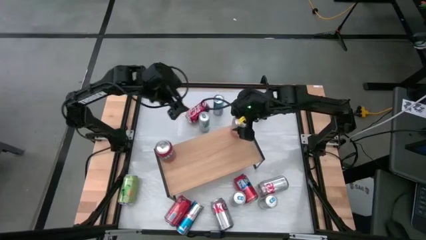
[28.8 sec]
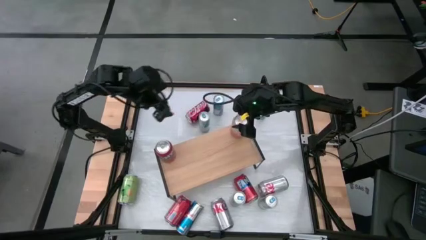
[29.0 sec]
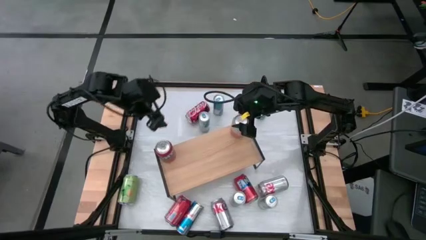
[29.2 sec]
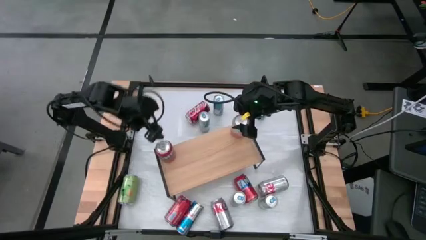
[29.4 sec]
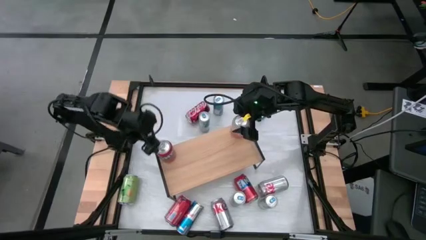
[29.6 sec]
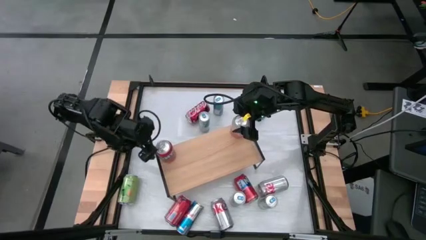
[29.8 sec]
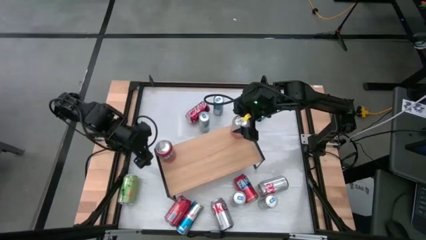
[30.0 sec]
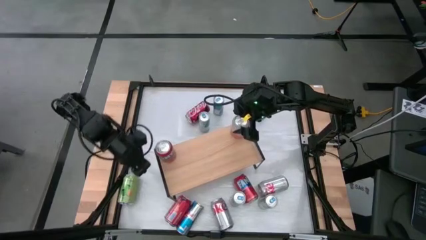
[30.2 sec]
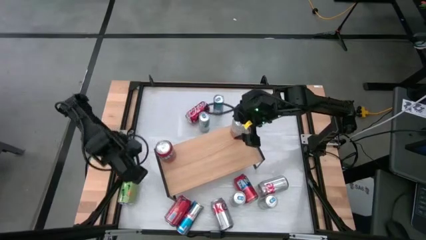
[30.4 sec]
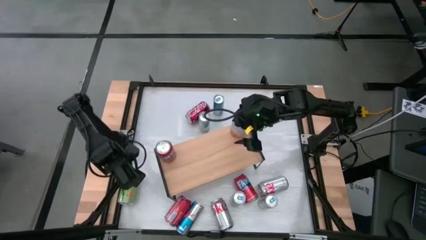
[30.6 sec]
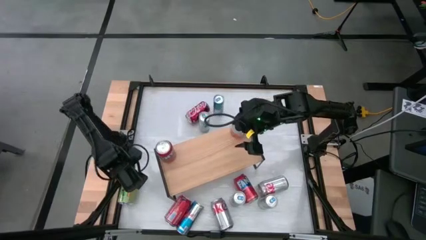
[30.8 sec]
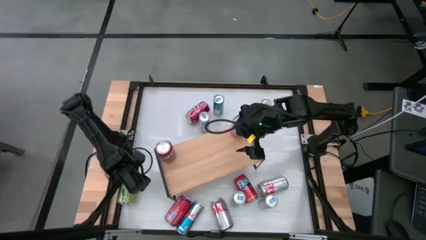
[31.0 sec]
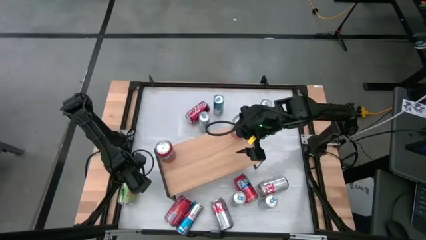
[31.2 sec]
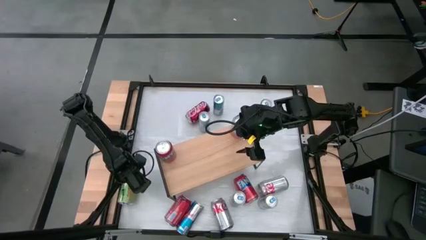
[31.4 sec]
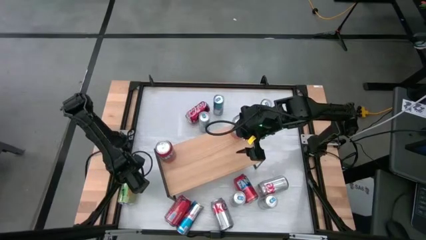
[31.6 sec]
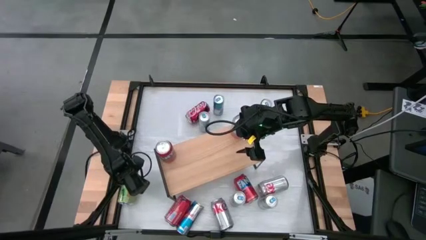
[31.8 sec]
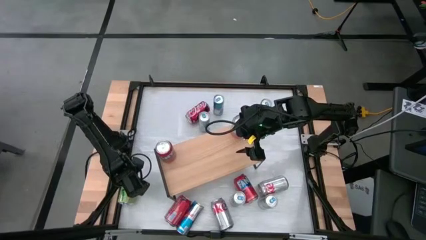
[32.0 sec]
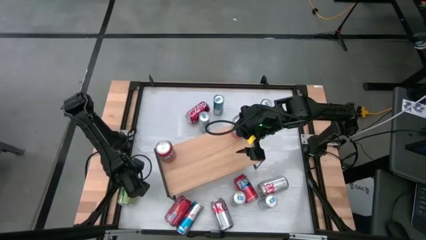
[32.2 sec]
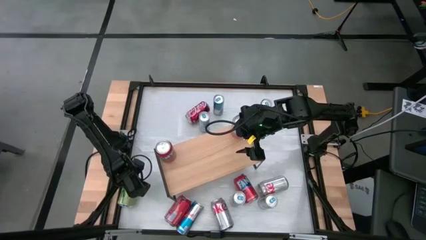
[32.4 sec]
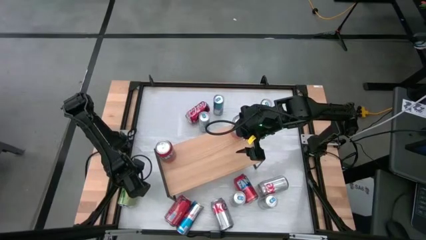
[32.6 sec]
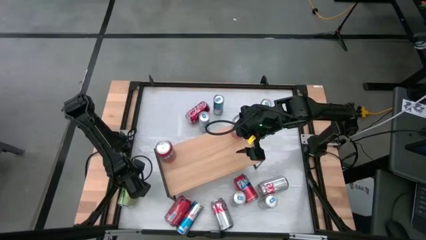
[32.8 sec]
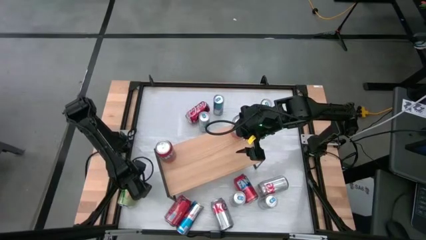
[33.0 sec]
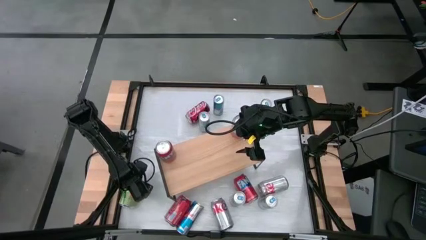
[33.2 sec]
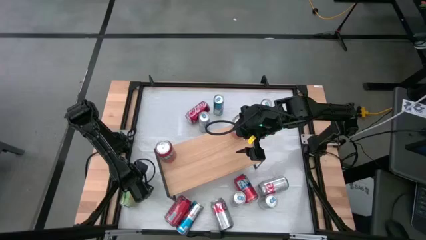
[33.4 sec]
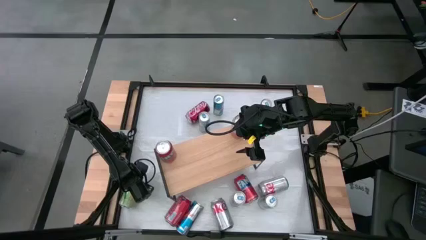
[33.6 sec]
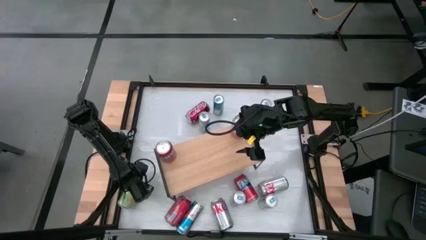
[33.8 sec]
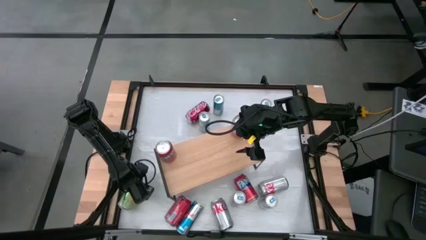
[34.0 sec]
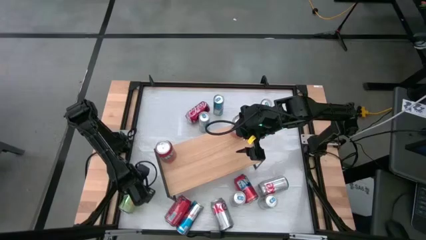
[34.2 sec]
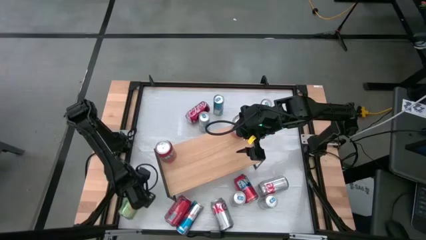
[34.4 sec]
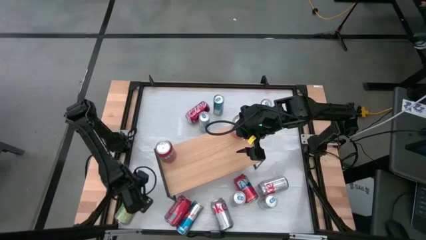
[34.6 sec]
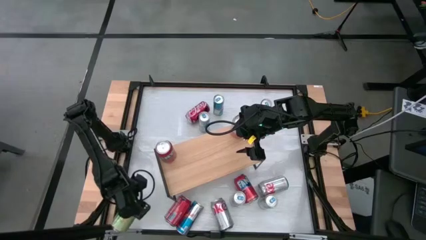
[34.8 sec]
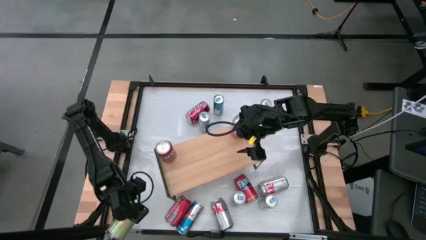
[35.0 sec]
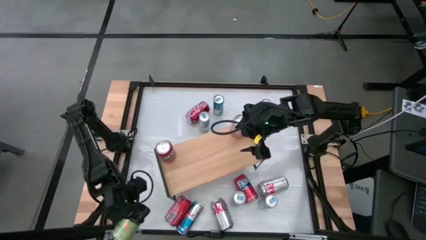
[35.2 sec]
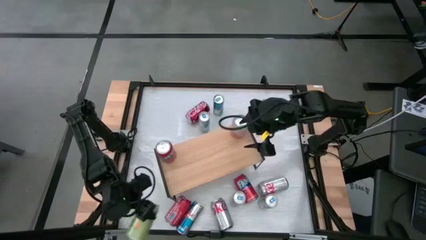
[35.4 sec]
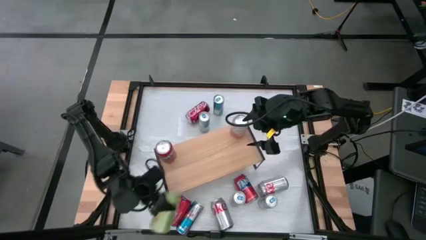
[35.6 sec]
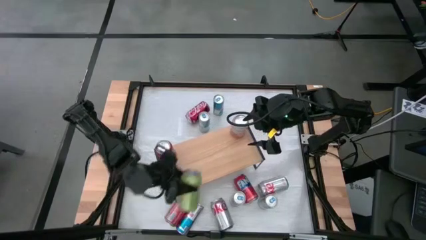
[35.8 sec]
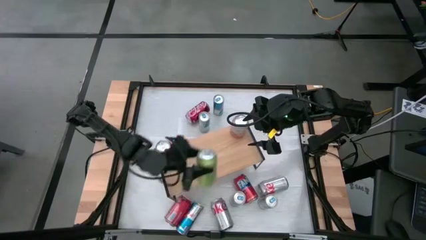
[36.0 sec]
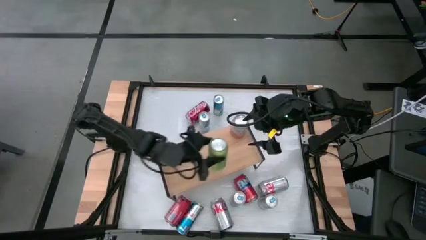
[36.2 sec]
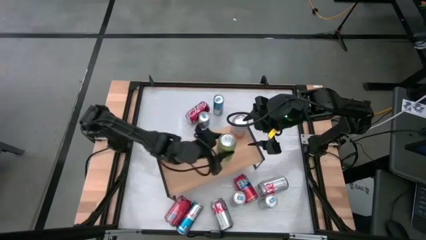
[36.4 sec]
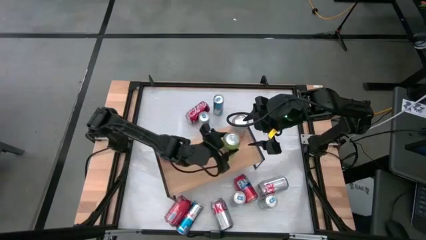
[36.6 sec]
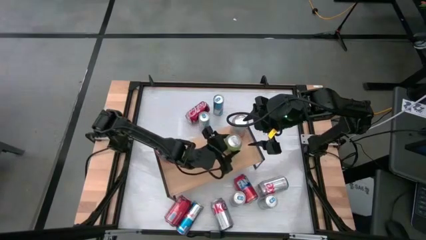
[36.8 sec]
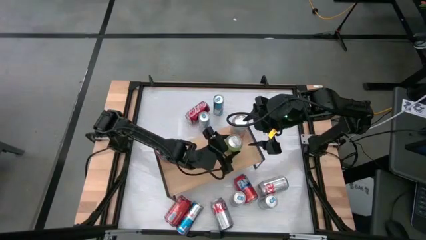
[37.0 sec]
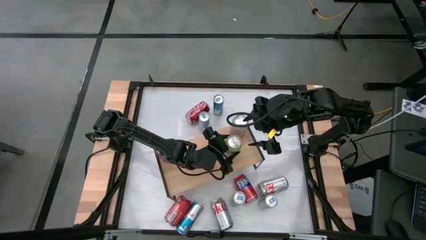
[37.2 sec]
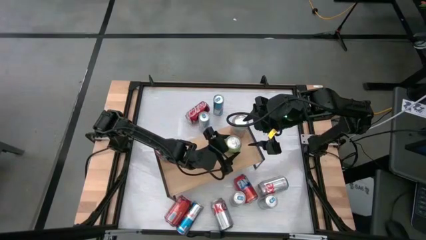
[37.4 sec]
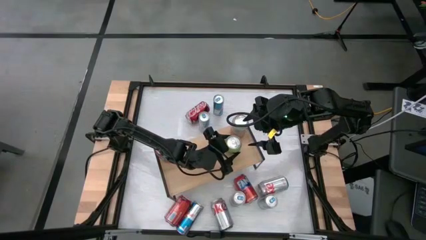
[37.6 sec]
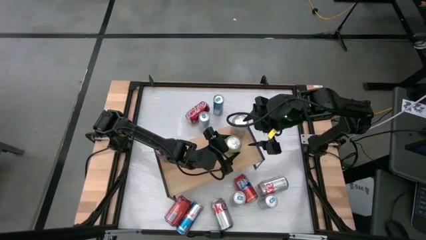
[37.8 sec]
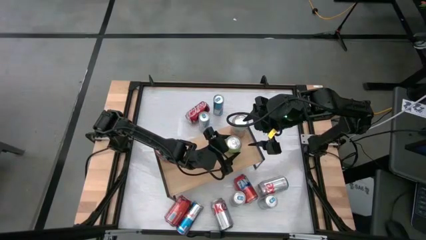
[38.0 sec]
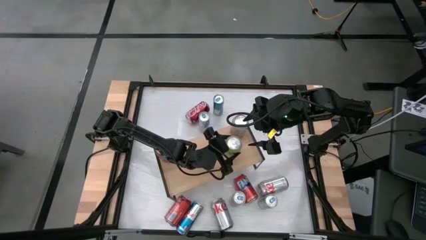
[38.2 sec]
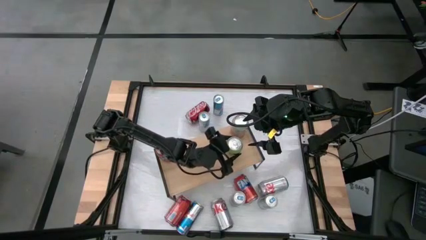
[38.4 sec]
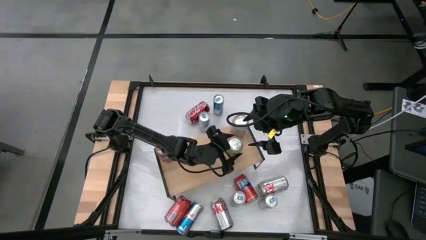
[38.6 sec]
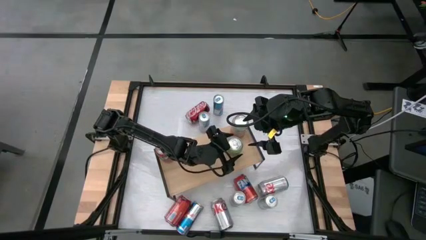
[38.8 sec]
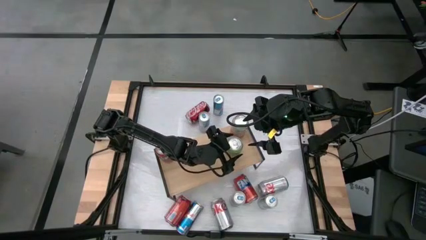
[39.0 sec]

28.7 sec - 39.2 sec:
Task: Place canned beverage on shelf
Put the light green soda can

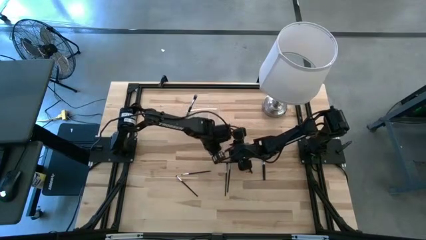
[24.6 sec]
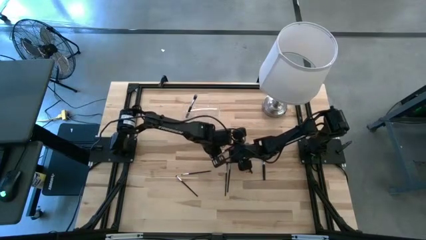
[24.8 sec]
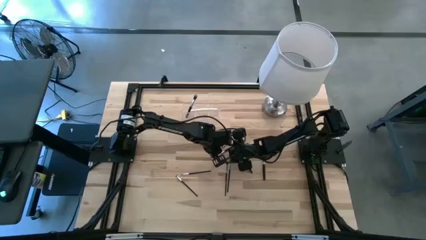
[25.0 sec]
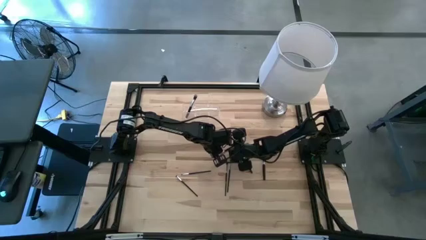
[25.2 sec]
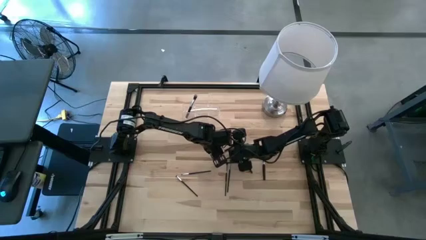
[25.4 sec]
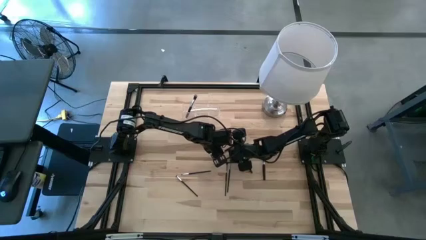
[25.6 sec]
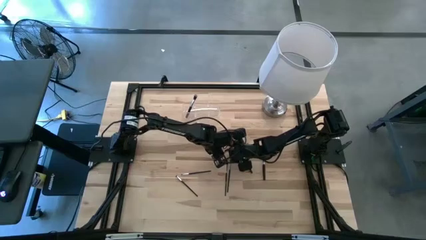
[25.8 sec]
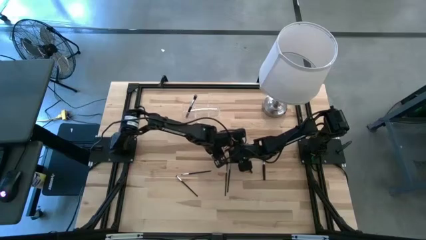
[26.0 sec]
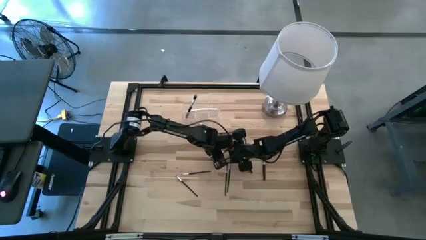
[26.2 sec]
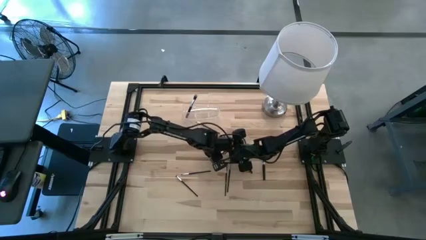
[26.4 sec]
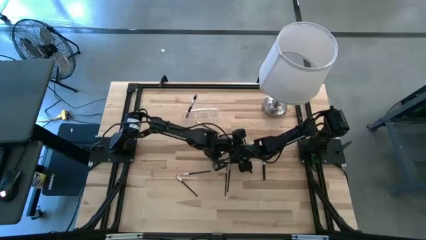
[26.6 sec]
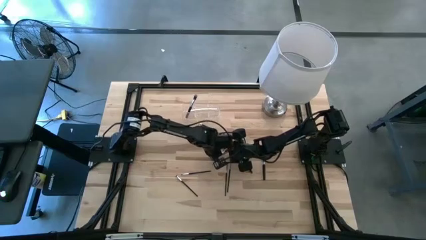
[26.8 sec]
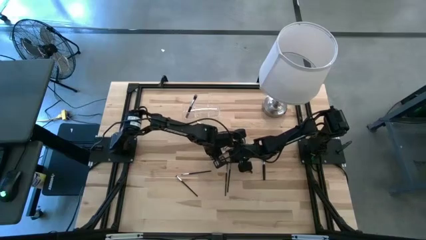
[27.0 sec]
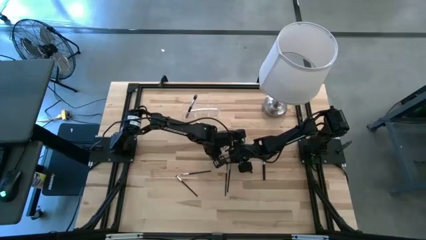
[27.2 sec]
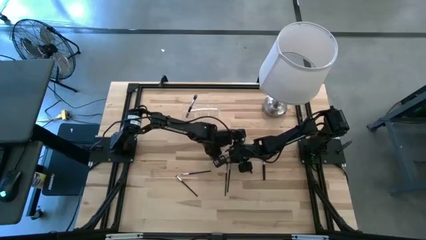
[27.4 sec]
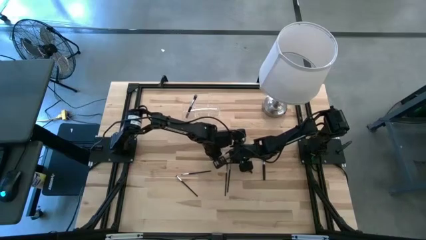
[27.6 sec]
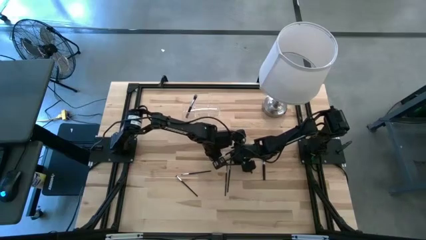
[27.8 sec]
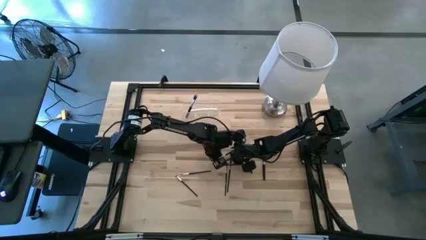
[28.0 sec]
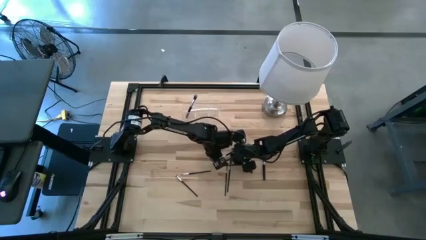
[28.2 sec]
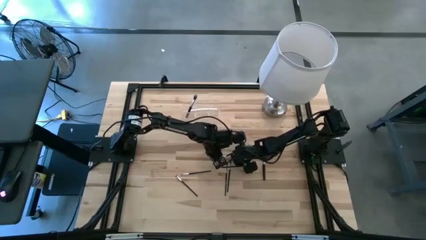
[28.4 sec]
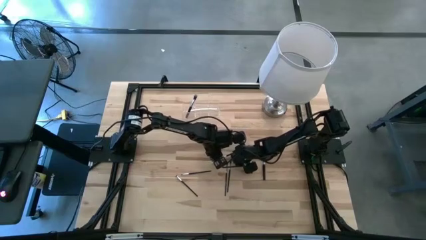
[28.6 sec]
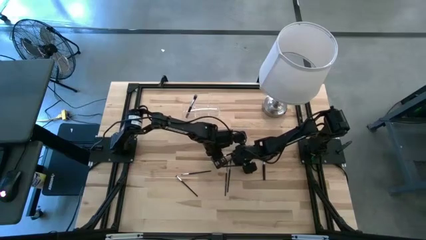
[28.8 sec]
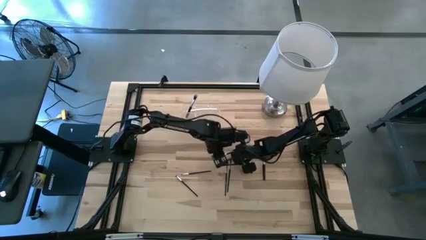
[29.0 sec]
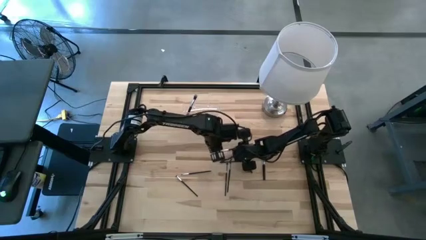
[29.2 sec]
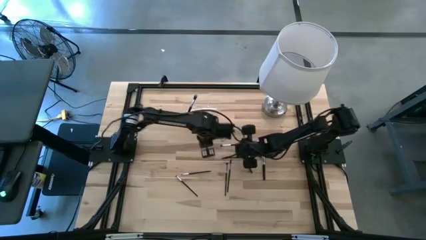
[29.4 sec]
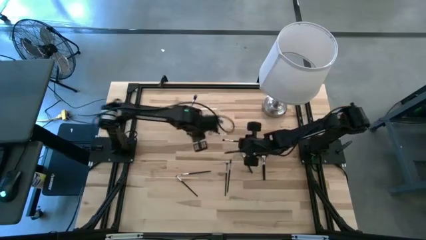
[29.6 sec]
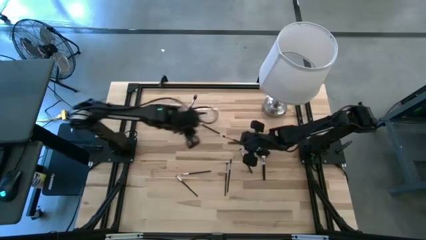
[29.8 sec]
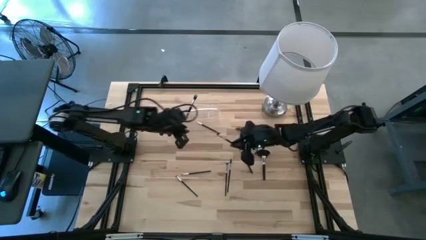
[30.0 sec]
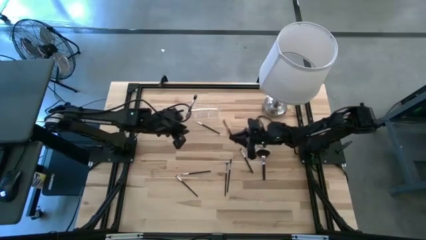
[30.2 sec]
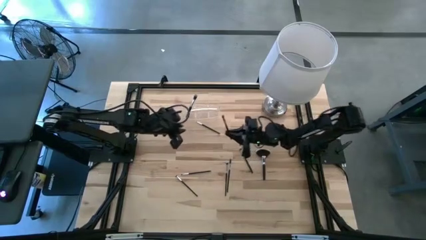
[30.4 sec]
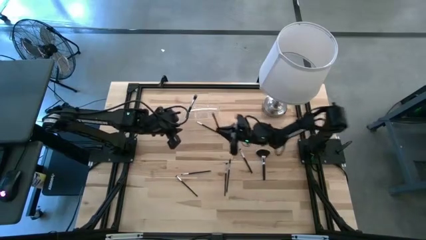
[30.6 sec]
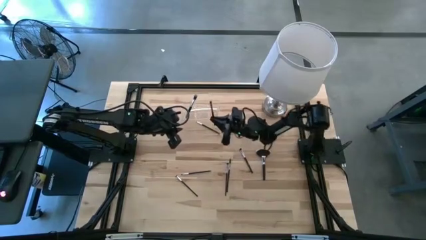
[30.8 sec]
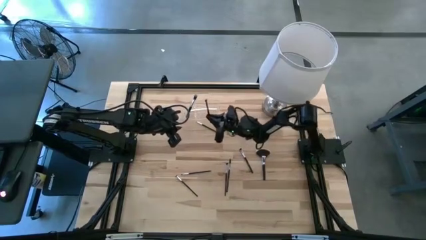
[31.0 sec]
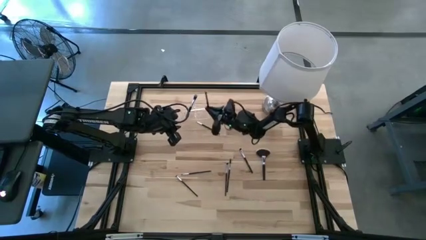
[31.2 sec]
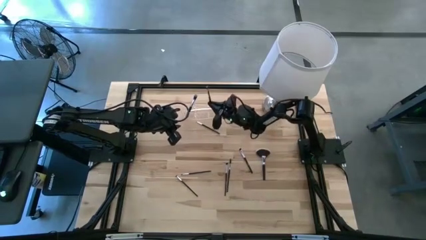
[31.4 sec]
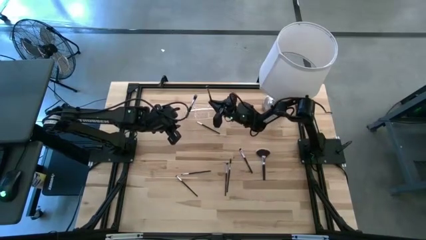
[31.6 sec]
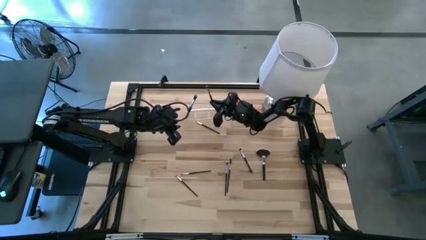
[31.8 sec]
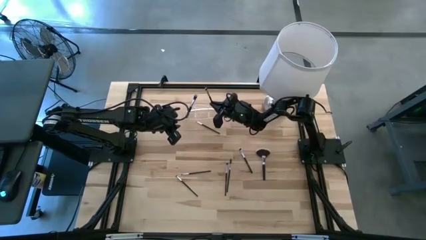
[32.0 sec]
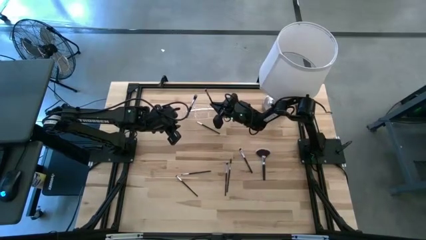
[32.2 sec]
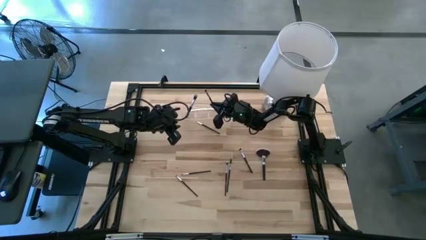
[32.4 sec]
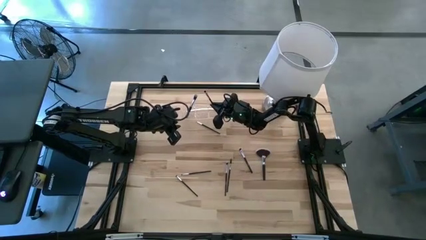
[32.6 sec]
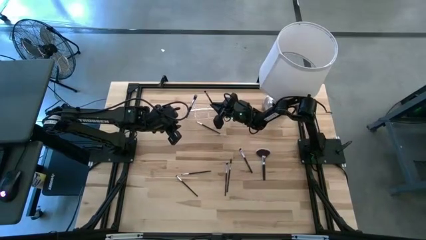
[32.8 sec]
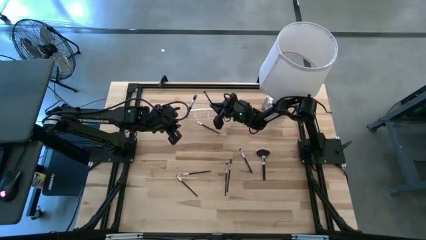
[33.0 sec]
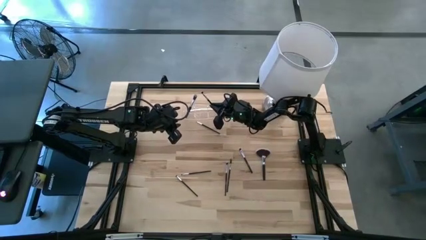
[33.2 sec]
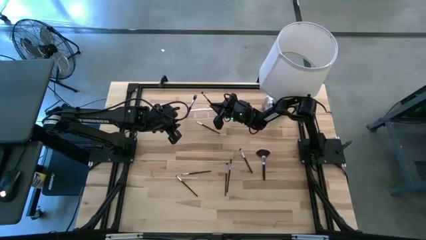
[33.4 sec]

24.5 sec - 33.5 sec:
Task: Put items in baskets/containers
Put the foundation brush into the transparent organizer
